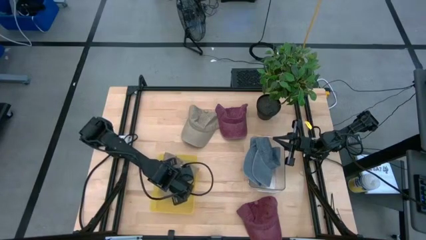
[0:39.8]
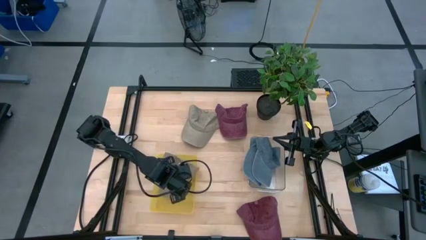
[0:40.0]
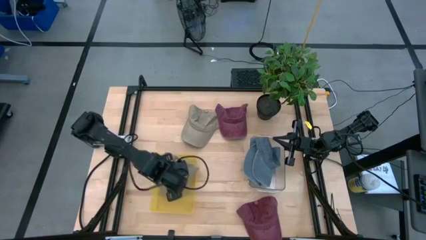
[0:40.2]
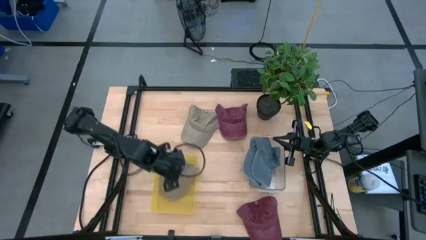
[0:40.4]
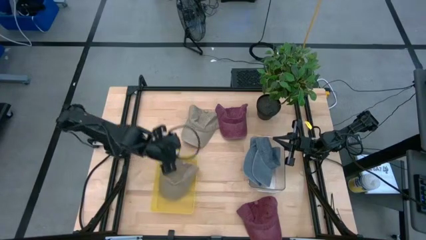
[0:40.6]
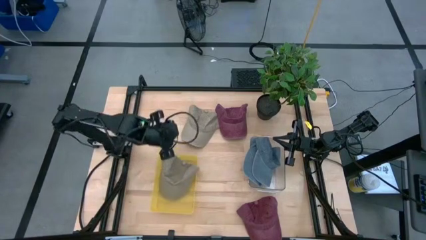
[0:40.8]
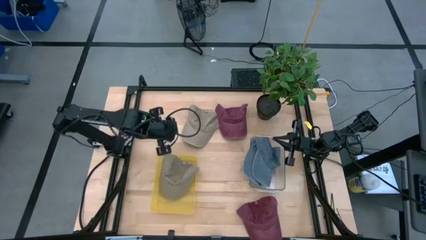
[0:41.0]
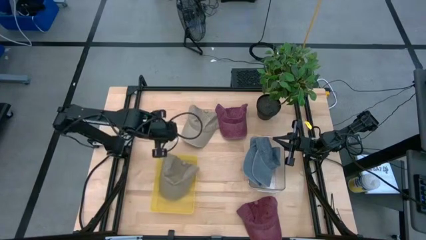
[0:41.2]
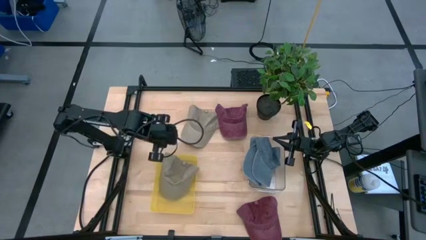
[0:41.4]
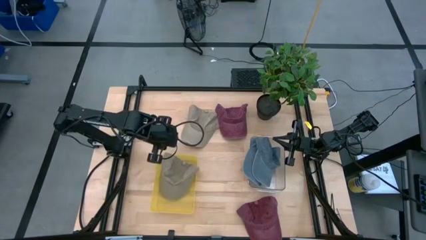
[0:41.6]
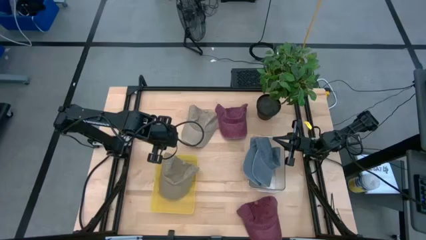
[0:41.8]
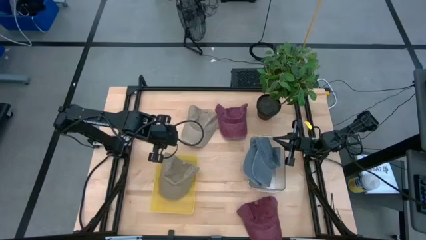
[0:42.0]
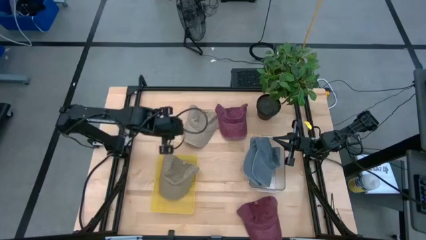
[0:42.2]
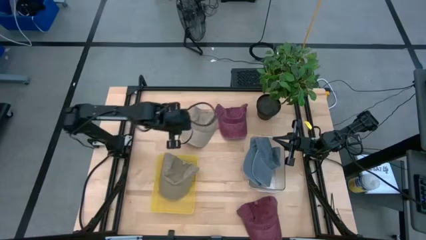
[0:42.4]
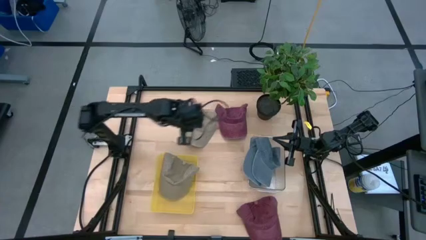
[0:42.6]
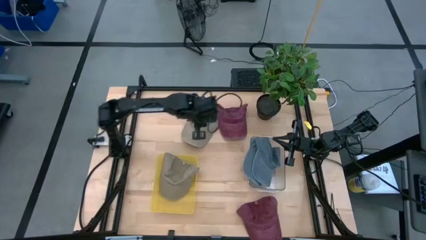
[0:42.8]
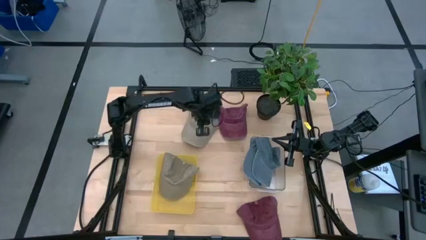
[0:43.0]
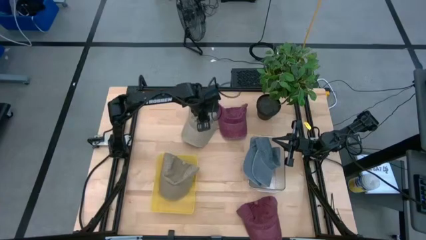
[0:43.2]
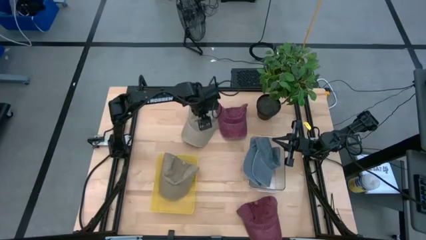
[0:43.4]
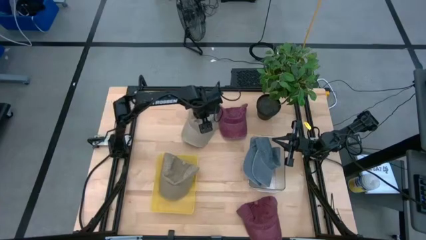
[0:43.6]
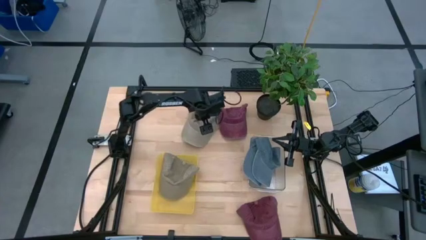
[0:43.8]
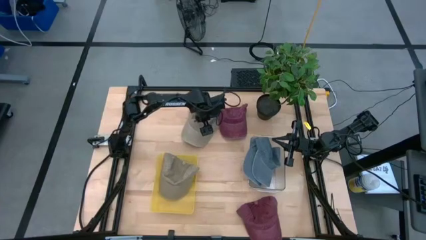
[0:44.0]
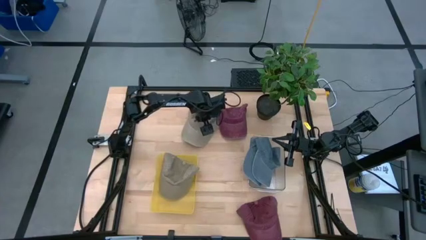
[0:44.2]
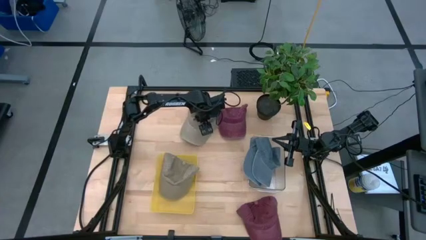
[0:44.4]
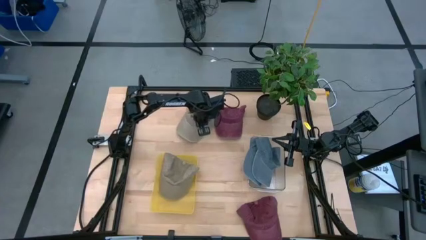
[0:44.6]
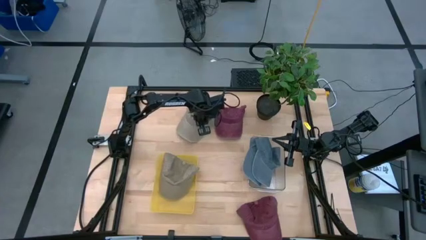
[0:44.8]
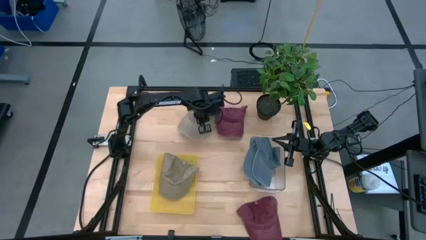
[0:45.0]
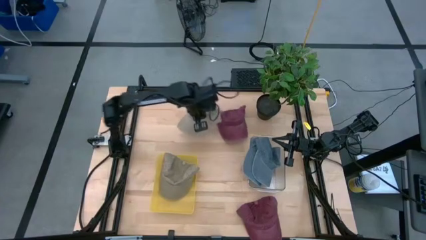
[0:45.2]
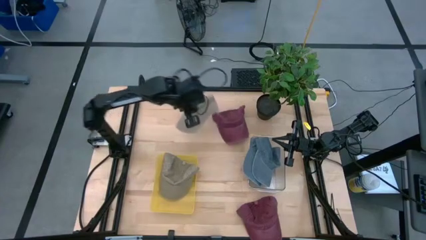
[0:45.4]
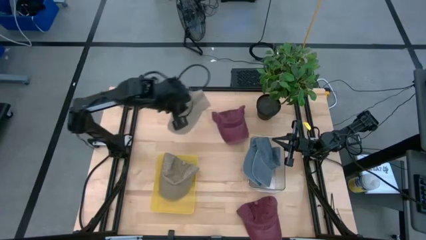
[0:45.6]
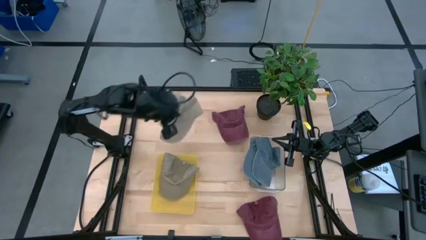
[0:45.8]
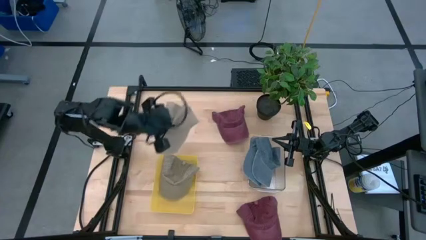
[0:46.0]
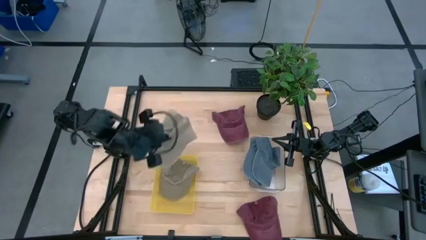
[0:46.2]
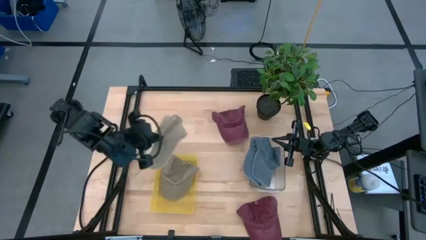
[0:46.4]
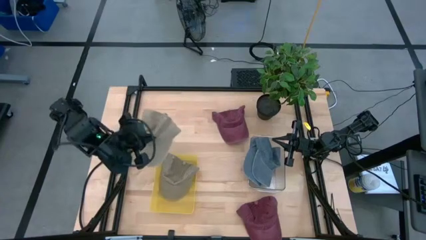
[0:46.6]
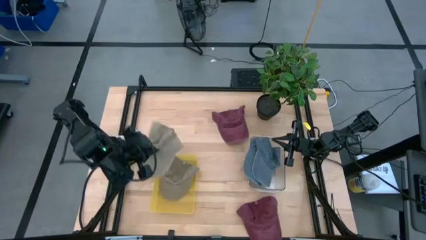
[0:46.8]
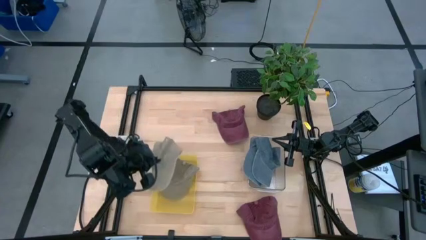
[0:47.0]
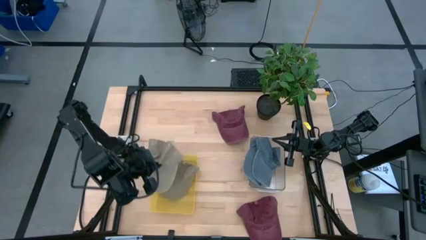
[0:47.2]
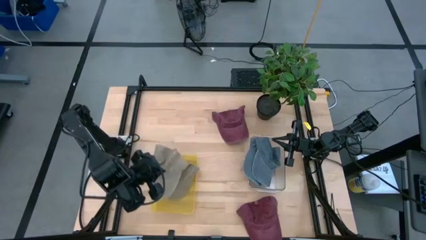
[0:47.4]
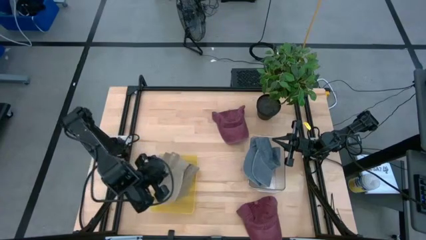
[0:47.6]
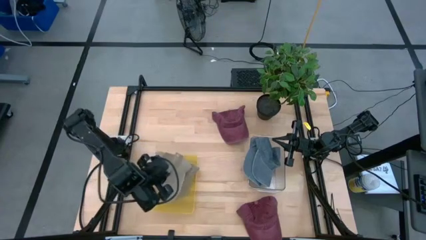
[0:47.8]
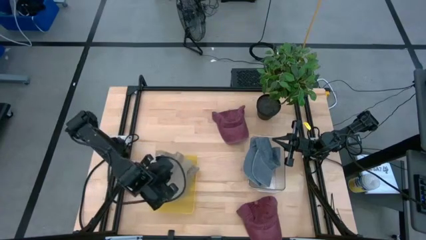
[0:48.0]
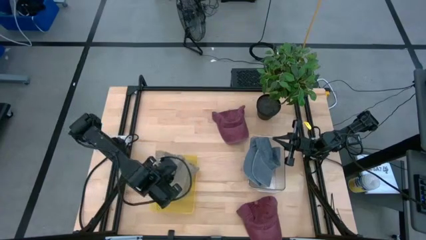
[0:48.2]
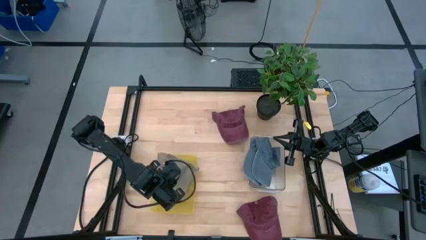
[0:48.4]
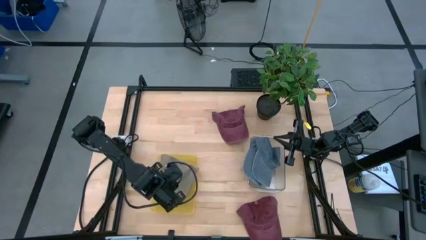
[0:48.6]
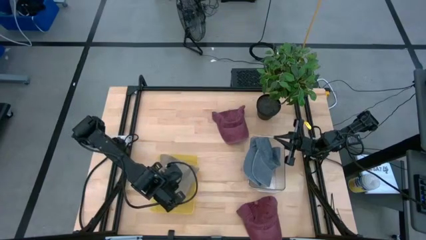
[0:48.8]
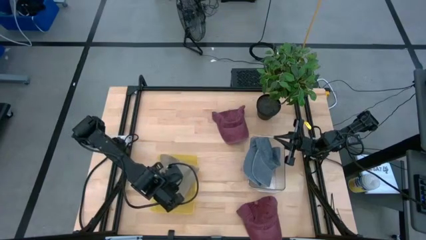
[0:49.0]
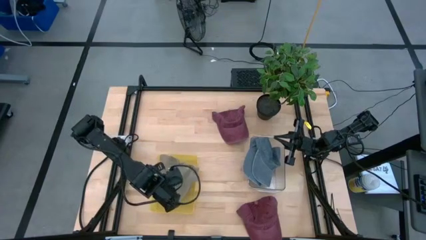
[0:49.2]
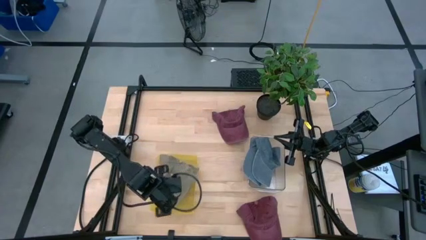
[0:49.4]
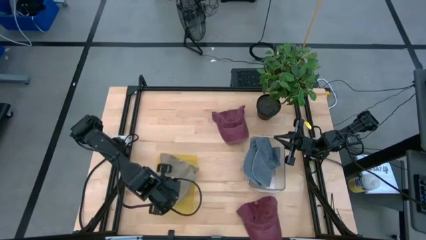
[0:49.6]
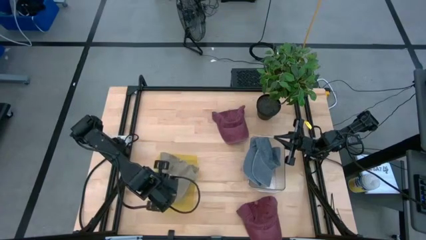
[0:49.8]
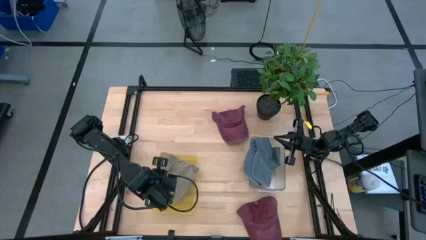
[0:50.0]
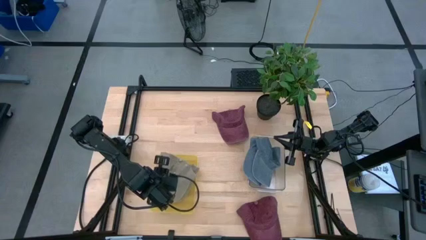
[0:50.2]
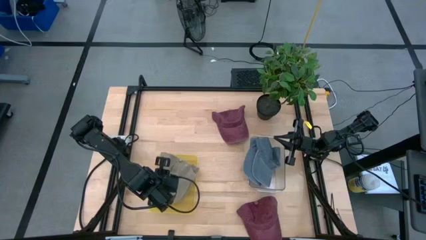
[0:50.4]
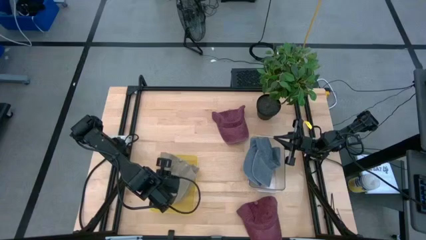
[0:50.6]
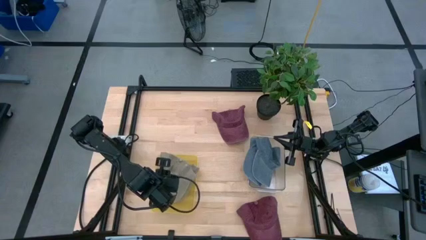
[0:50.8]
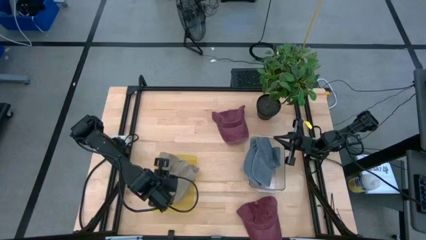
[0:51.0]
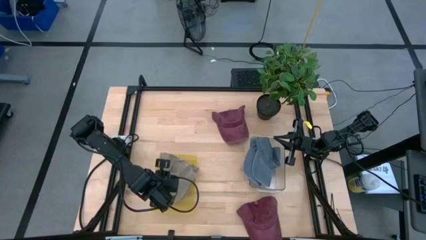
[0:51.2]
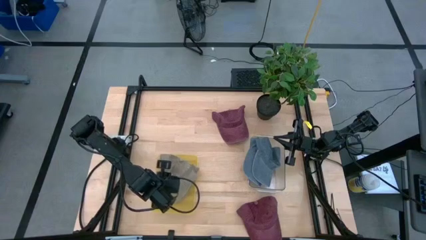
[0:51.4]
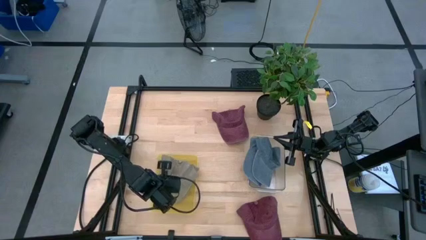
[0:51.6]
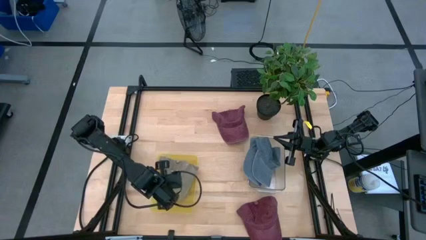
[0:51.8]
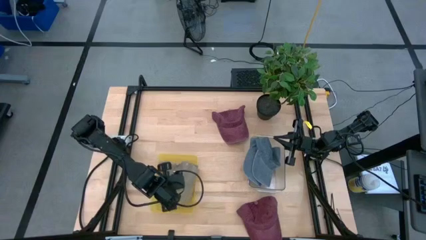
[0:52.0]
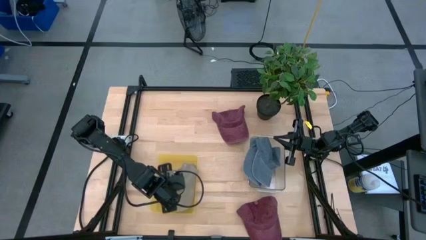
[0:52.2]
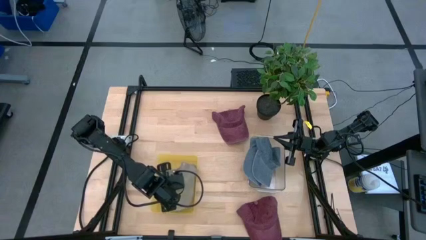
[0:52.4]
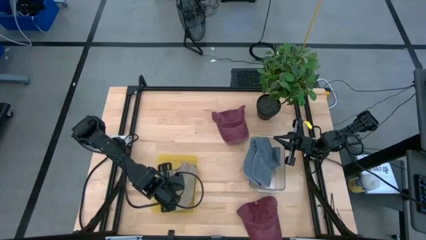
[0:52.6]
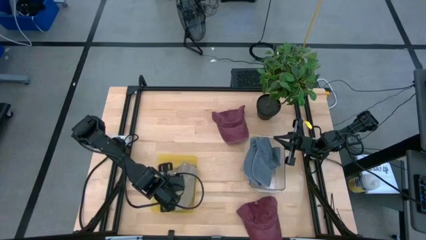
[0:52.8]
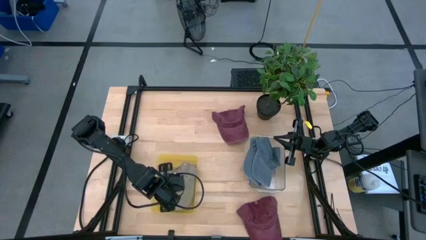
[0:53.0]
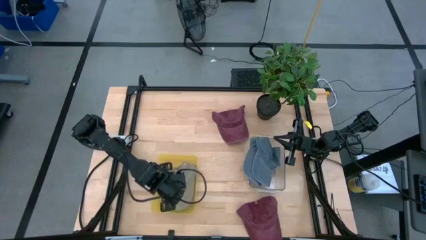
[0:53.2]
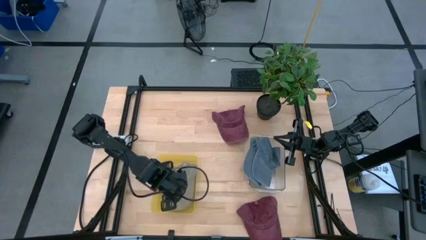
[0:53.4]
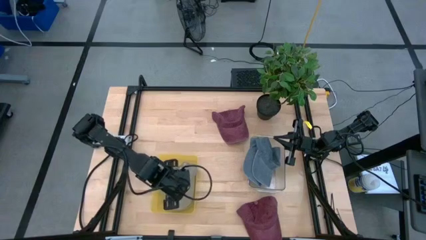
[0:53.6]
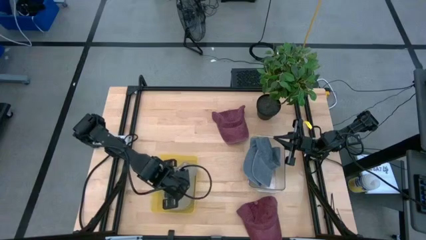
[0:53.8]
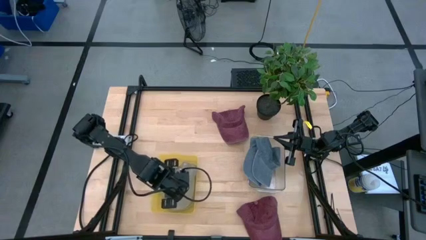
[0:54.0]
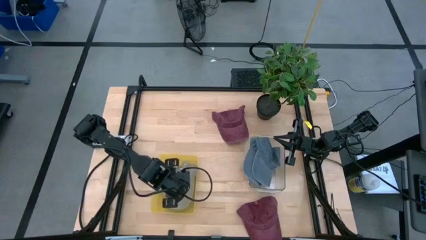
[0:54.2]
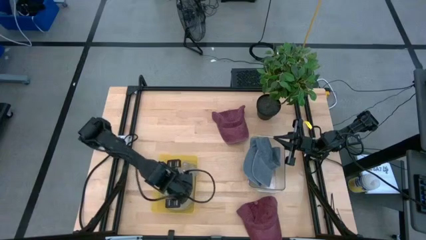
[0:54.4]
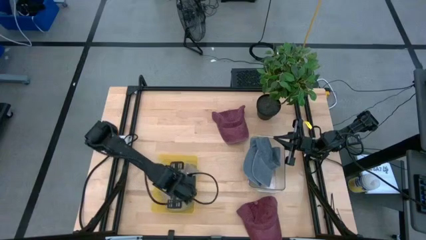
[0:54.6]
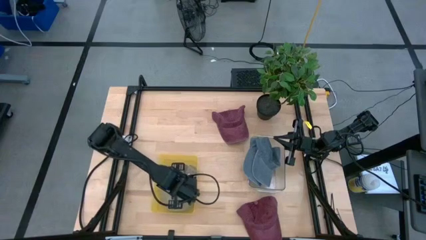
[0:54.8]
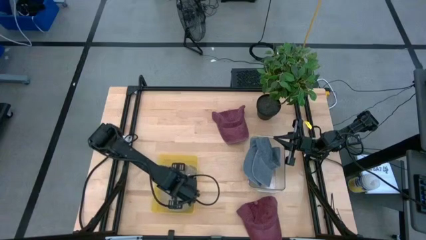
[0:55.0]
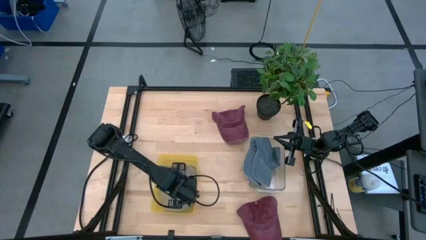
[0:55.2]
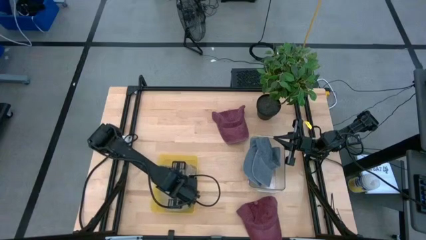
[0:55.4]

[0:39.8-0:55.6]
Task: Pick & Place hat
Put the brown cap into the yellow bin
